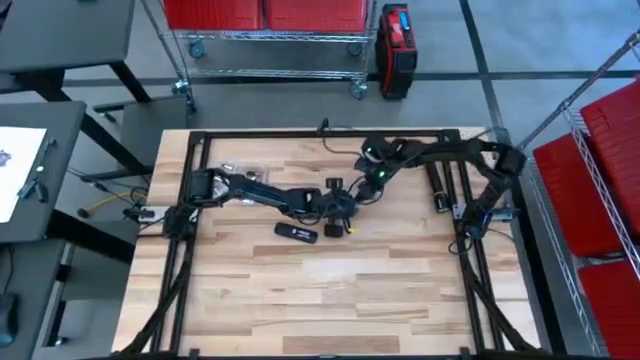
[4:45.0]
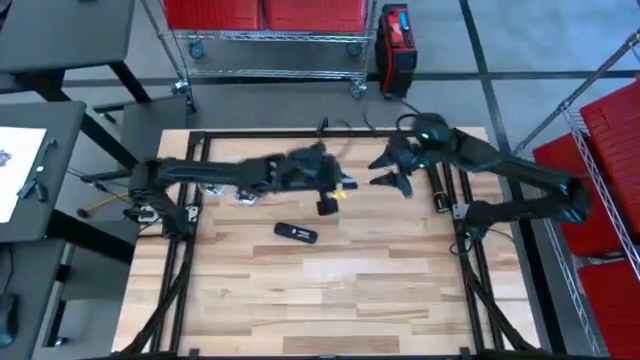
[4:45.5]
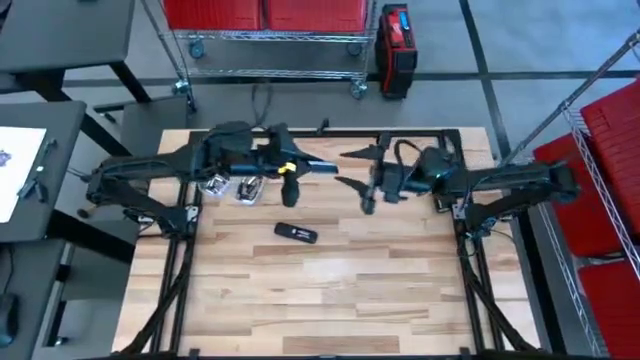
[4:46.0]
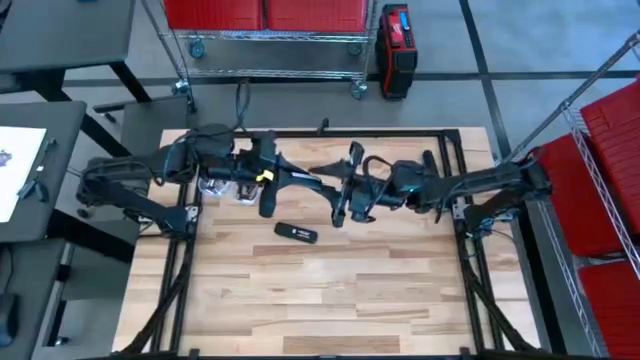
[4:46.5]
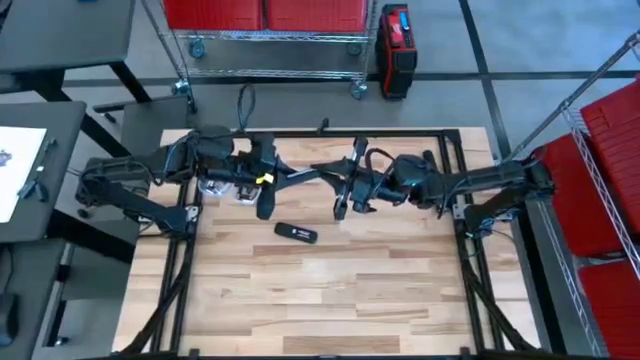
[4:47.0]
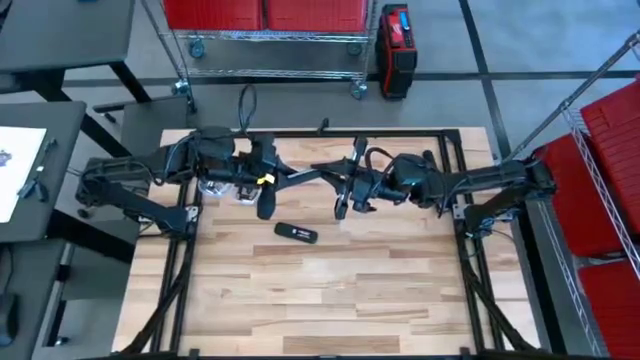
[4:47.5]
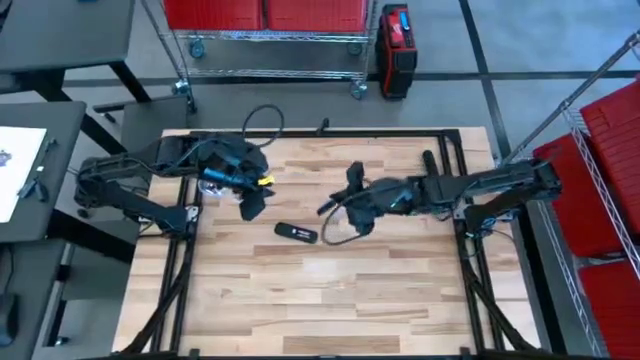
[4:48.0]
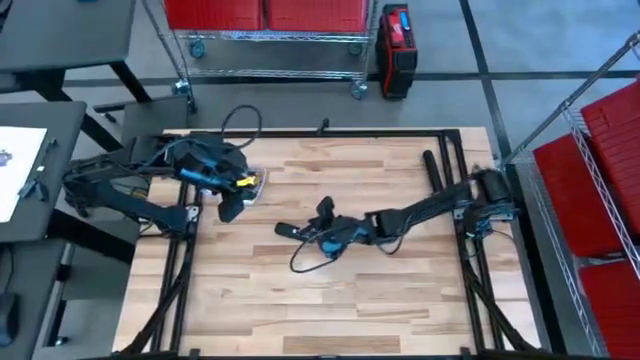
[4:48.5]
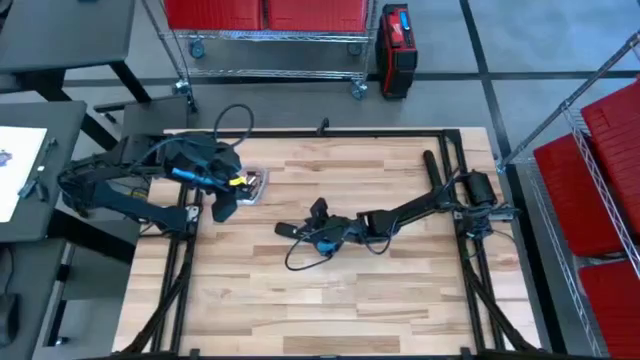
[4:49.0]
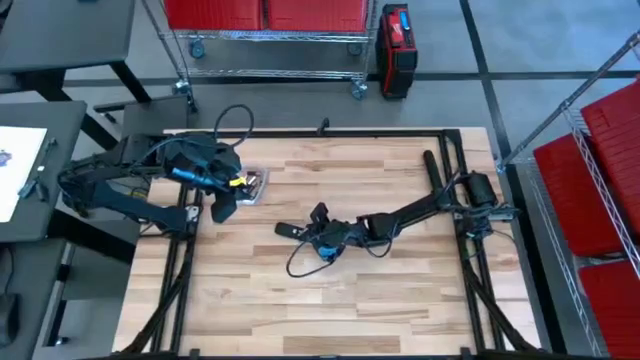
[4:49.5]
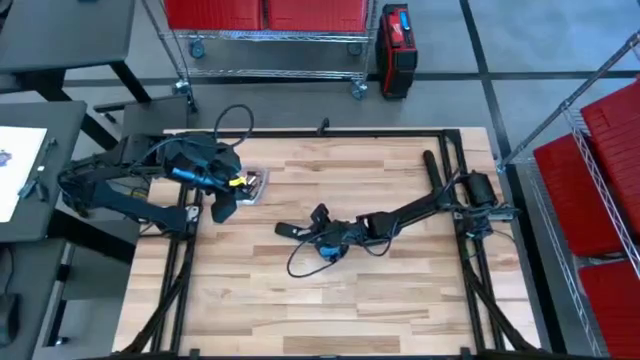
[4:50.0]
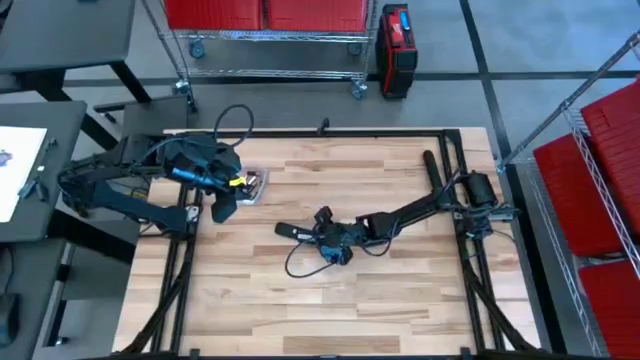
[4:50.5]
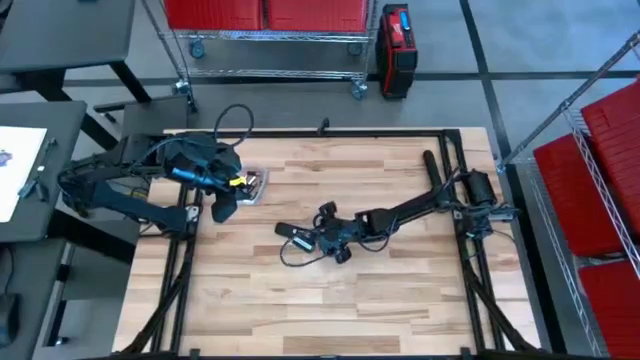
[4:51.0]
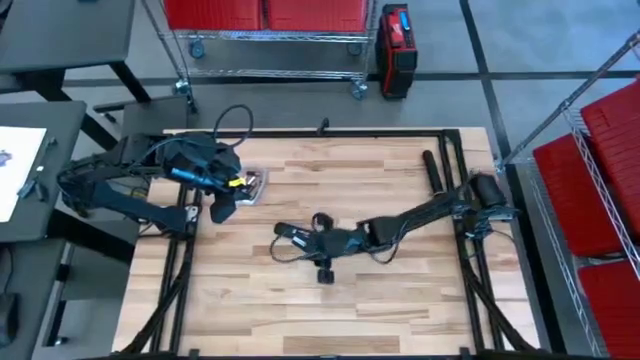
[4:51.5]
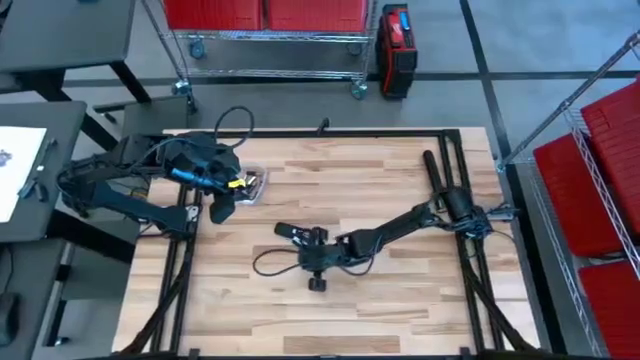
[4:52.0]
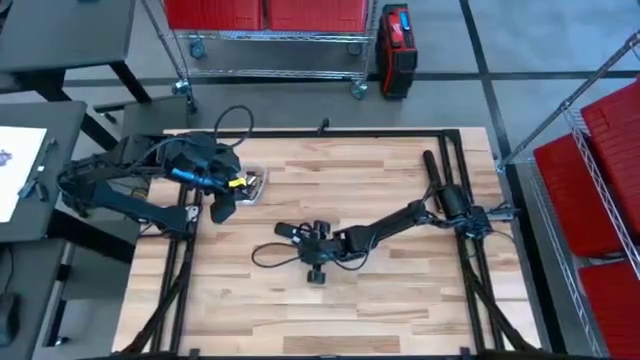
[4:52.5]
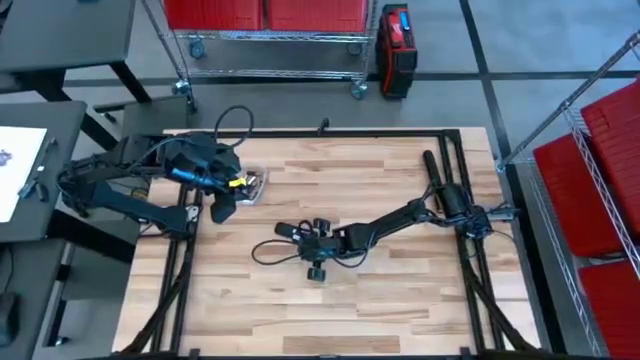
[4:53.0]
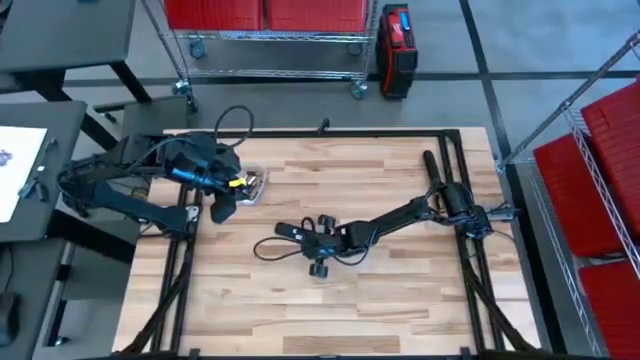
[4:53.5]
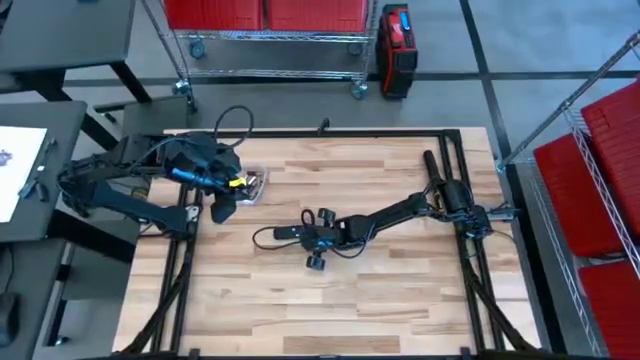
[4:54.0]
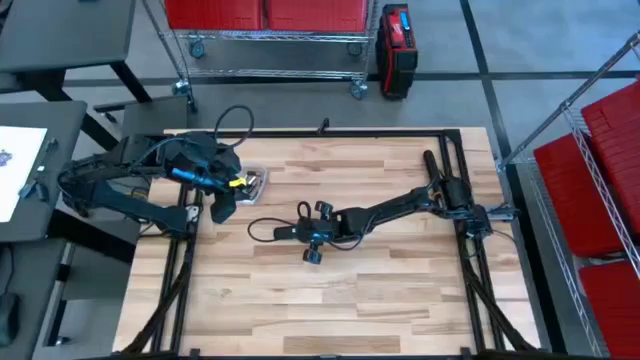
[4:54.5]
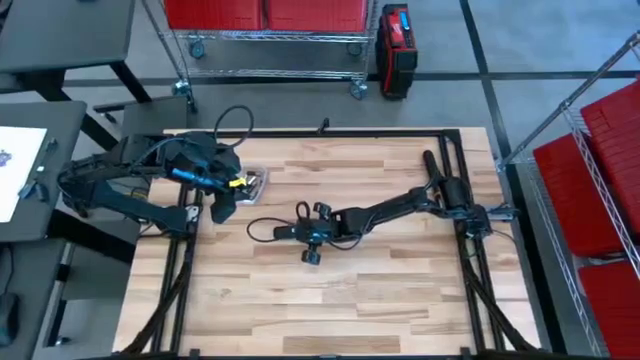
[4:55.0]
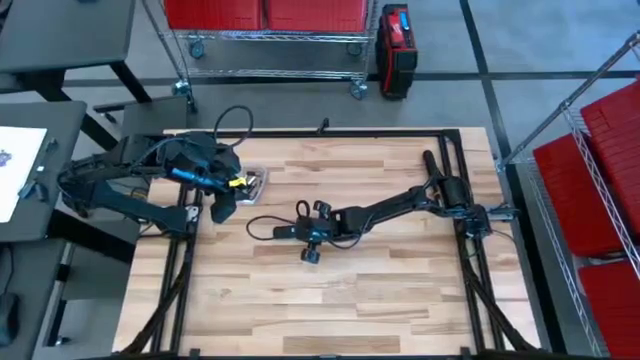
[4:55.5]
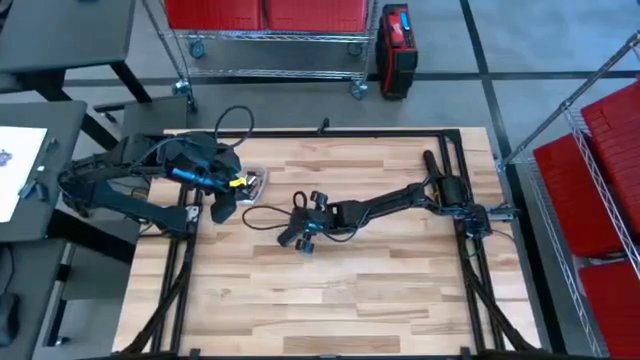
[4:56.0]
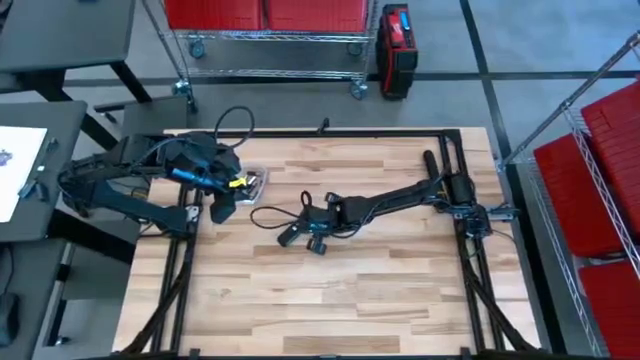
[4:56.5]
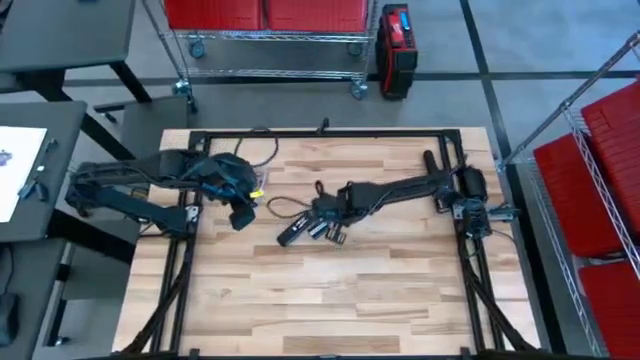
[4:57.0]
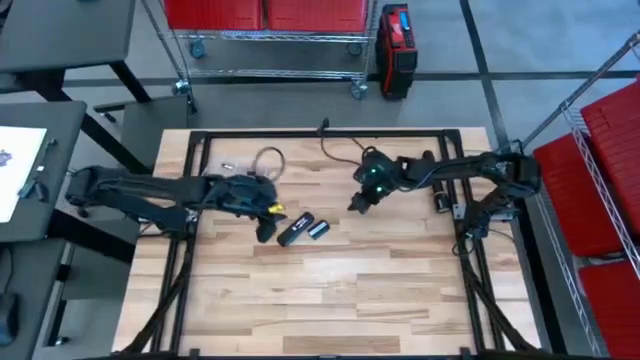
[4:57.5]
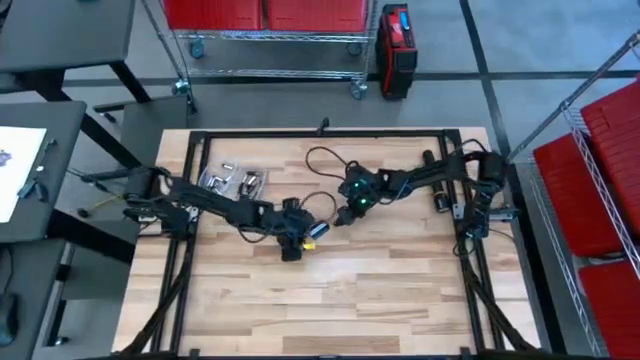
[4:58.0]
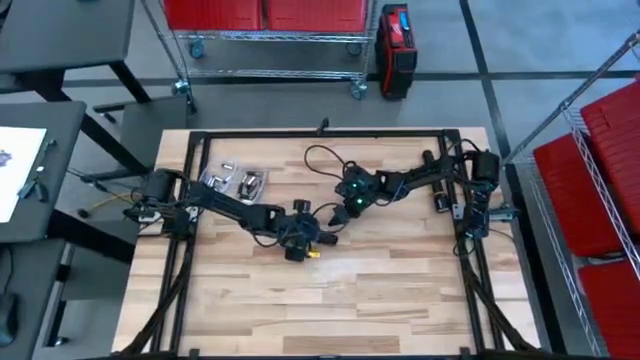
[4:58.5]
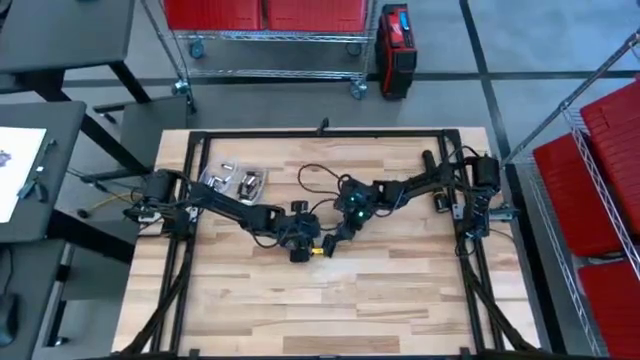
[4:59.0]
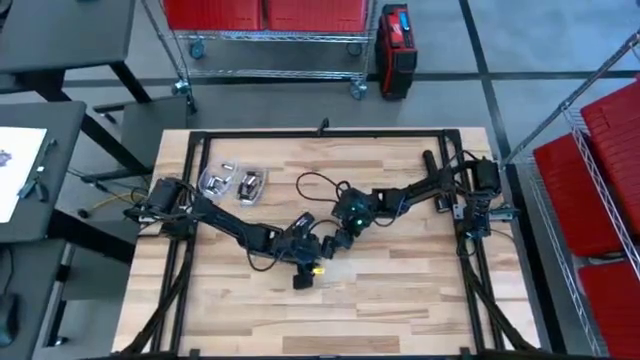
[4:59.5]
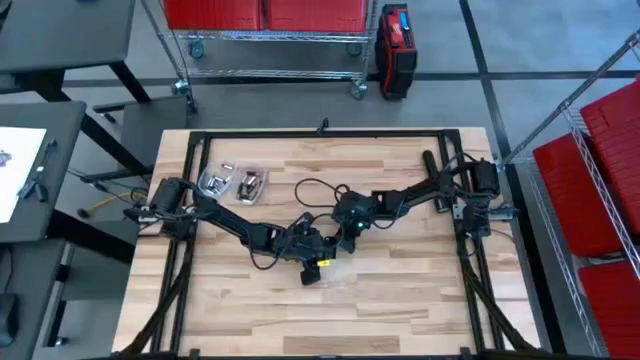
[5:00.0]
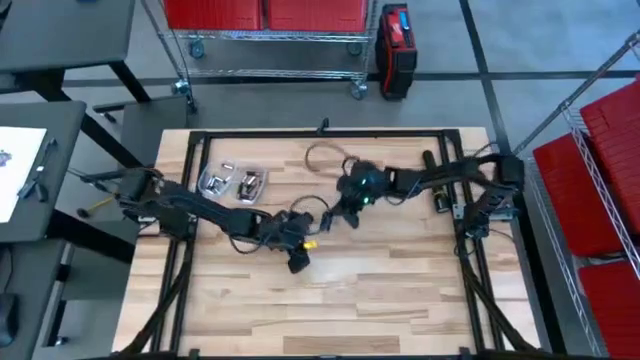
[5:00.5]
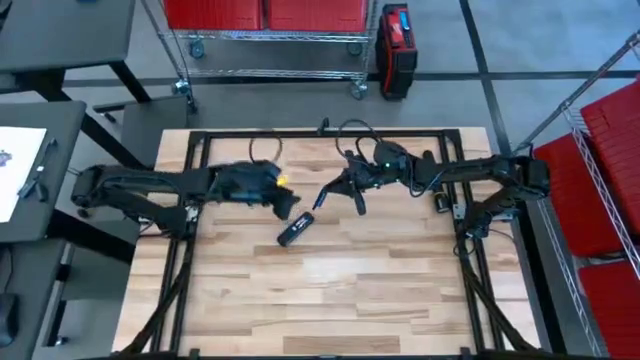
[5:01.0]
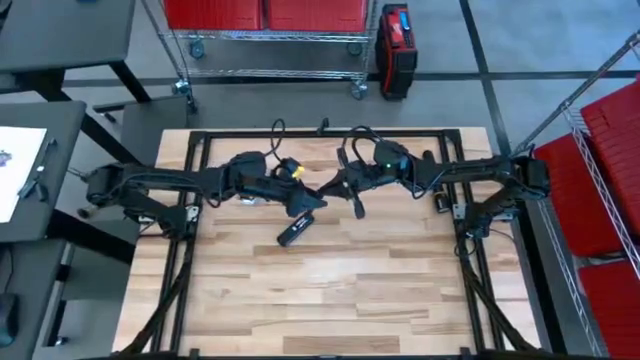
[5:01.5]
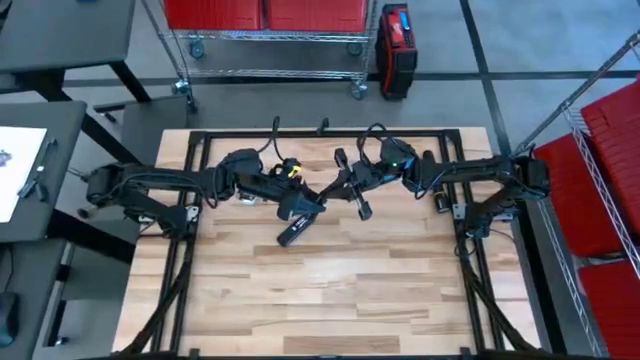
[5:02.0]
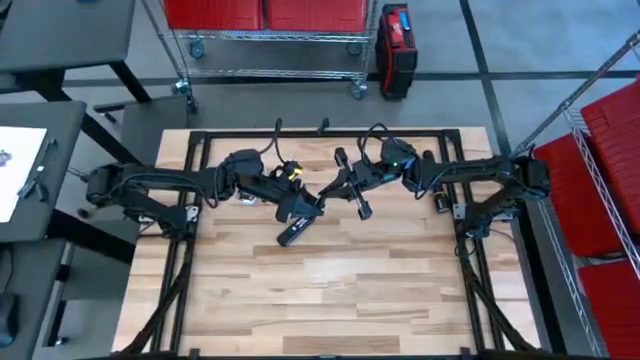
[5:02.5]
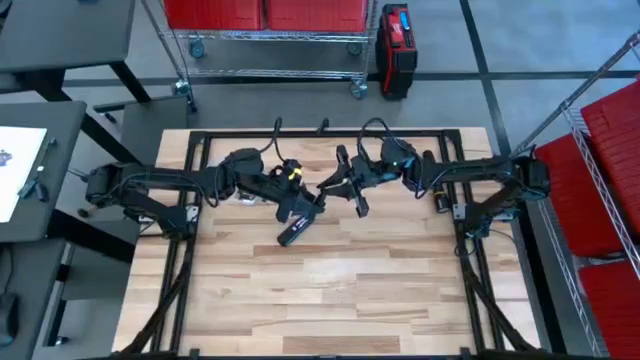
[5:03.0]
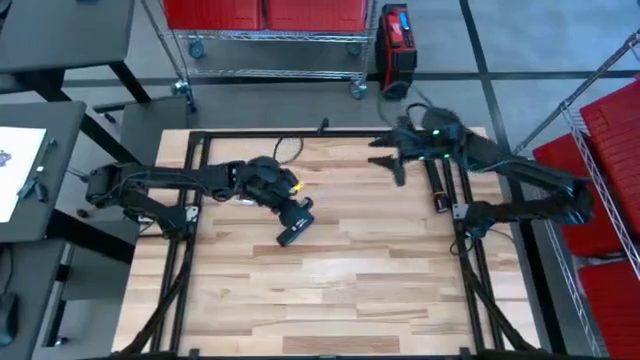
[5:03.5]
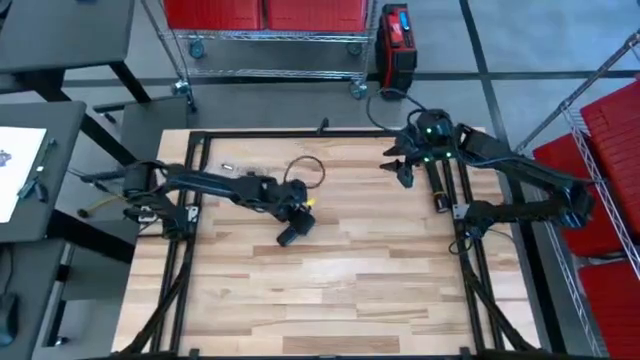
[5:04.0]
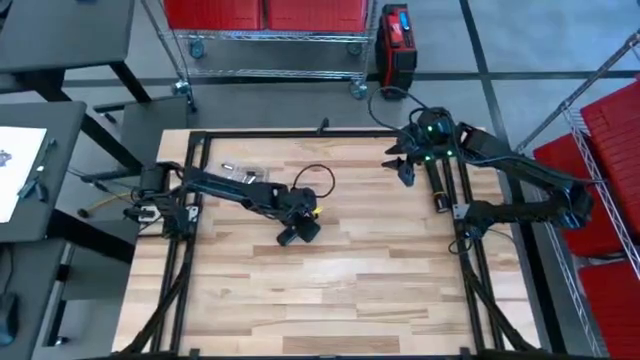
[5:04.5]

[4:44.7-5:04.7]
Task: Insert battery
Close the remote's battery compartment

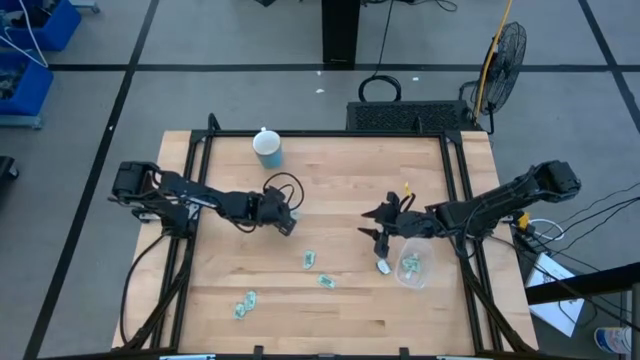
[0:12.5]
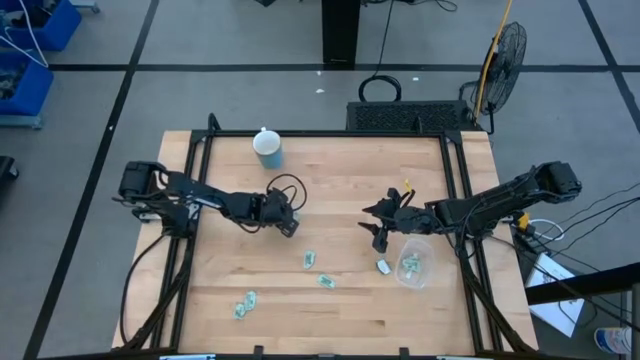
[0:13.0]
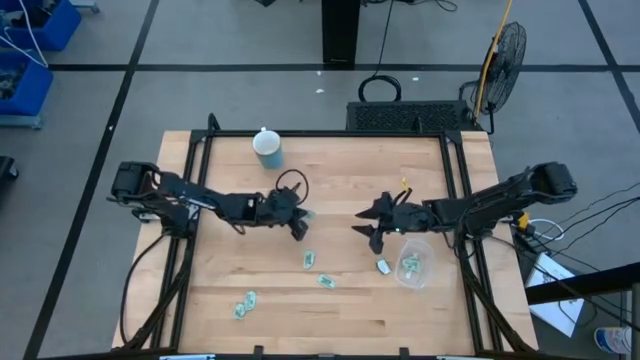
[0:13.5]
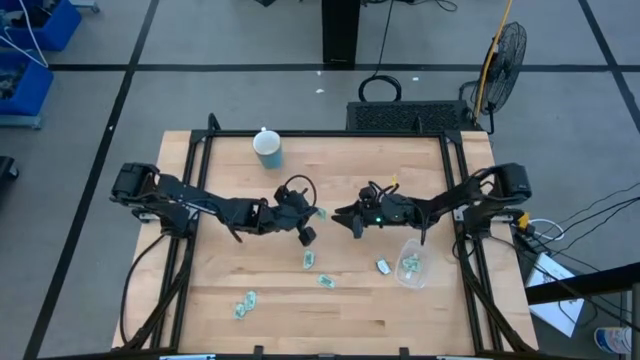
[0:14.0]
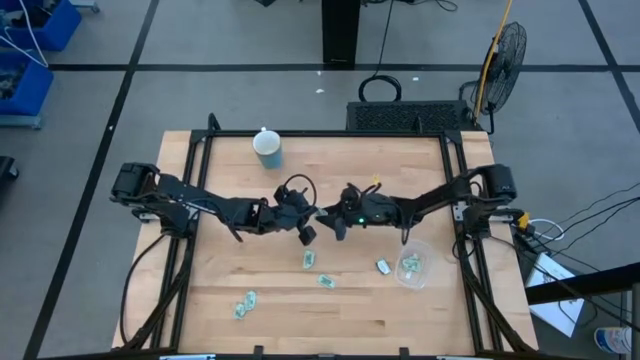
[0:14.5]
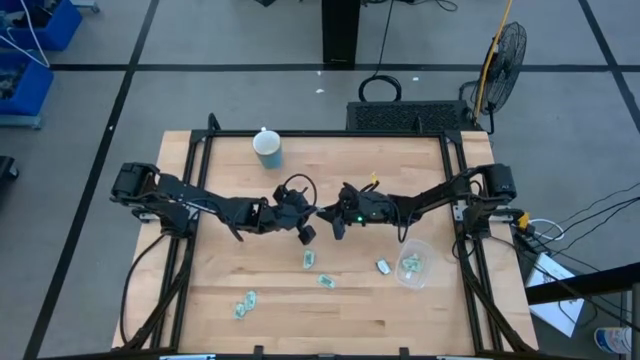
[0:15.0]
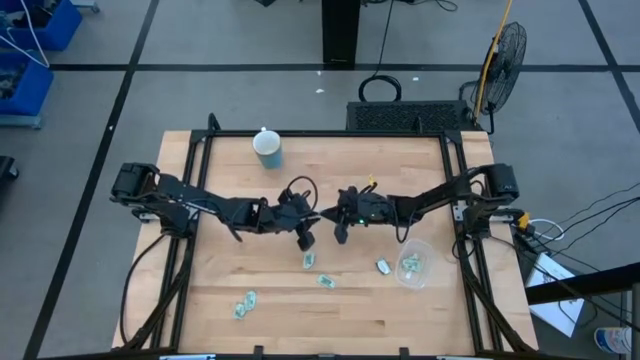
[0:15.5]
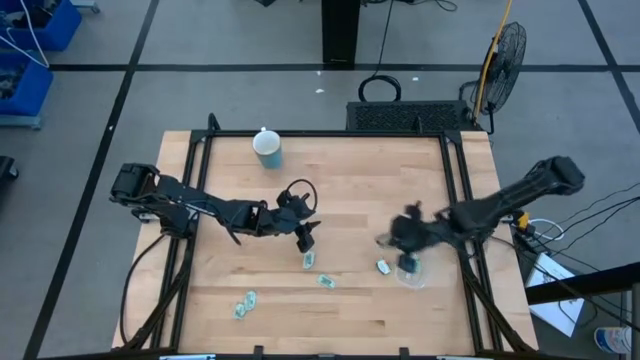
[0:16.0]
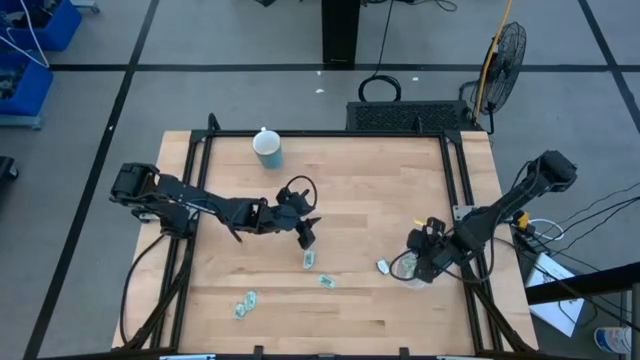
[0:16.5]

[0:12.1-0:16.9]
Task: Pick and place Stevia / Truvia into bins
Put the stevia packet into the transparent container
